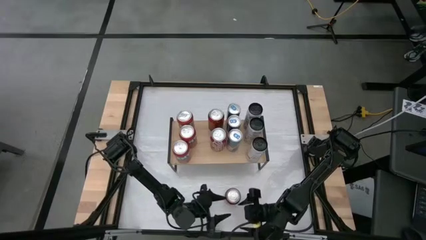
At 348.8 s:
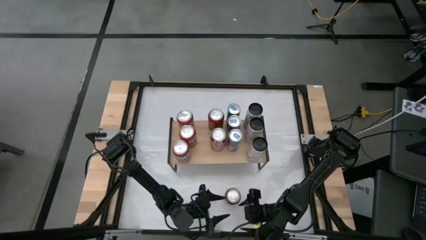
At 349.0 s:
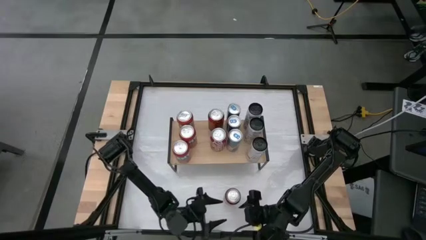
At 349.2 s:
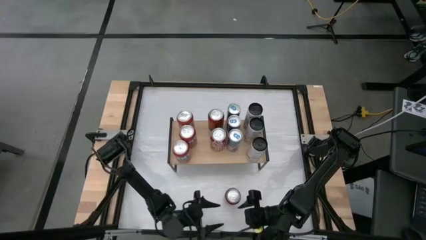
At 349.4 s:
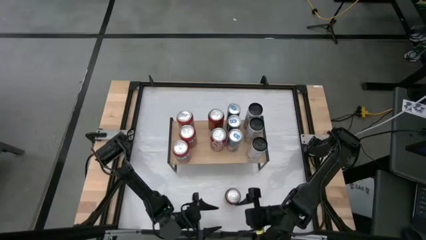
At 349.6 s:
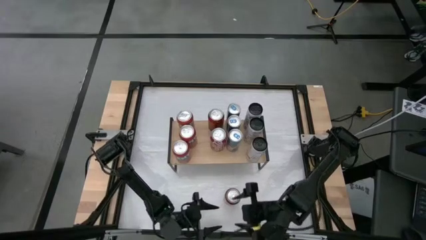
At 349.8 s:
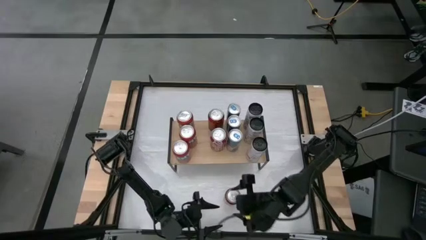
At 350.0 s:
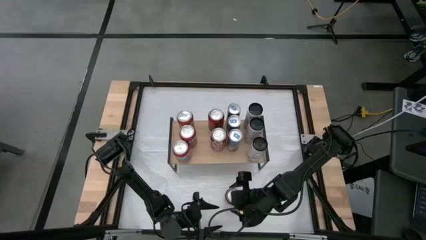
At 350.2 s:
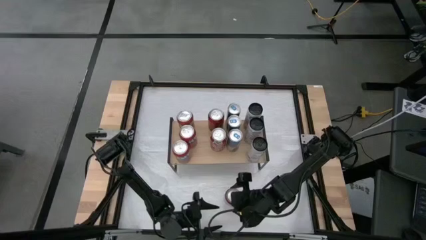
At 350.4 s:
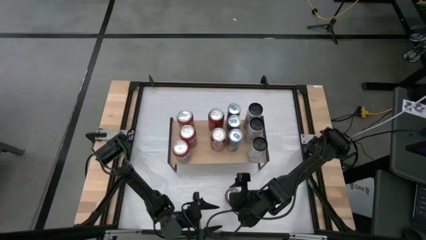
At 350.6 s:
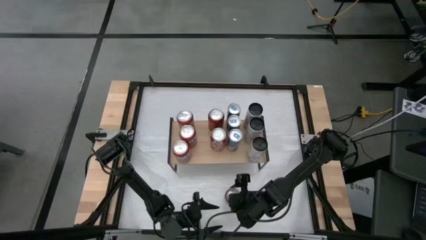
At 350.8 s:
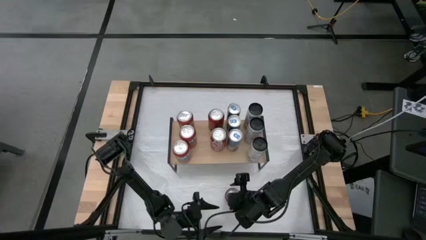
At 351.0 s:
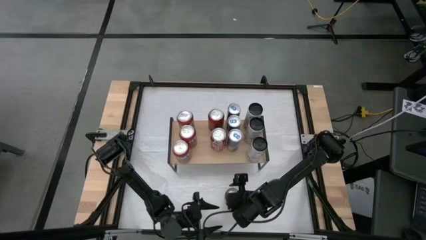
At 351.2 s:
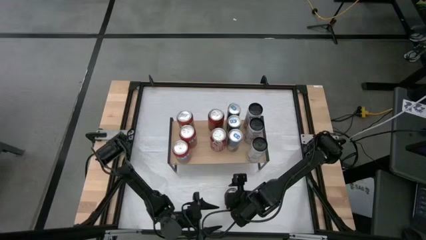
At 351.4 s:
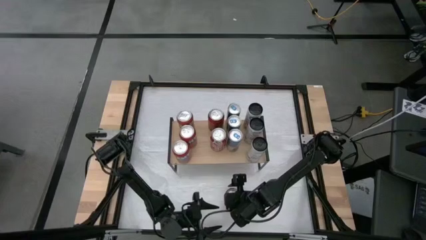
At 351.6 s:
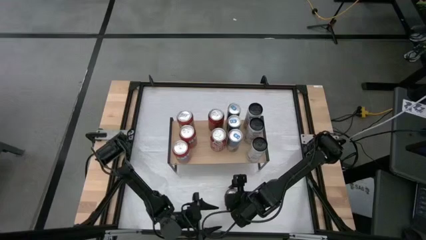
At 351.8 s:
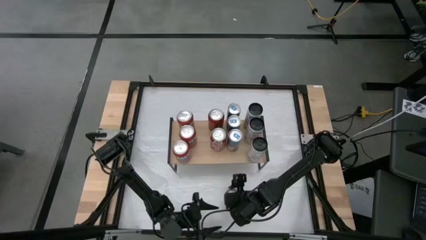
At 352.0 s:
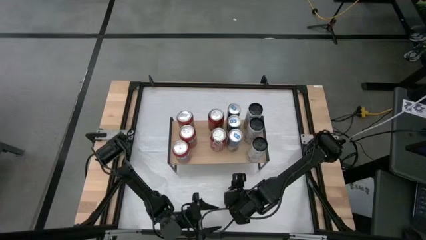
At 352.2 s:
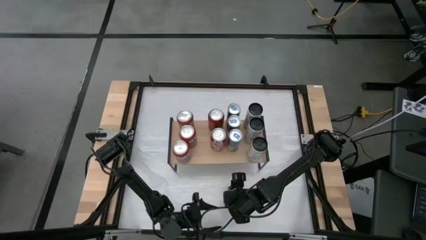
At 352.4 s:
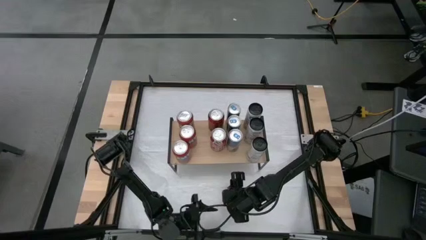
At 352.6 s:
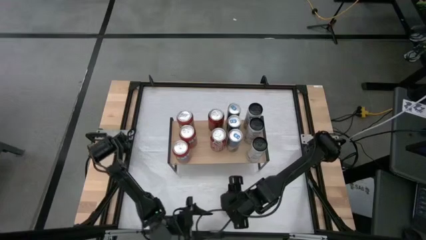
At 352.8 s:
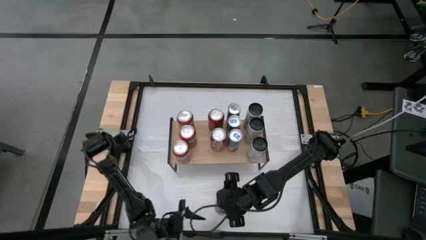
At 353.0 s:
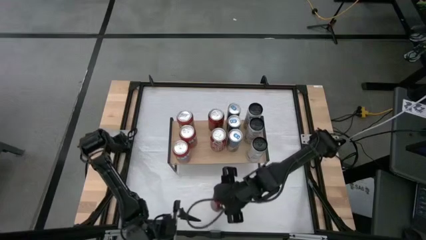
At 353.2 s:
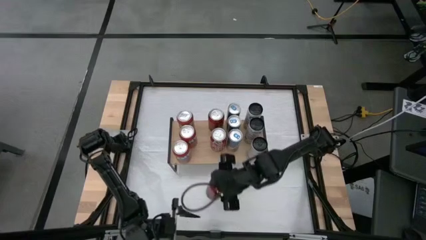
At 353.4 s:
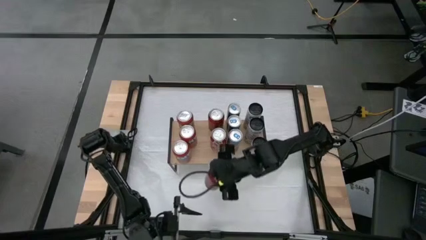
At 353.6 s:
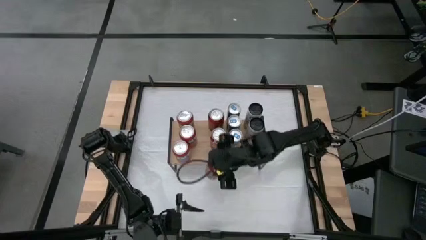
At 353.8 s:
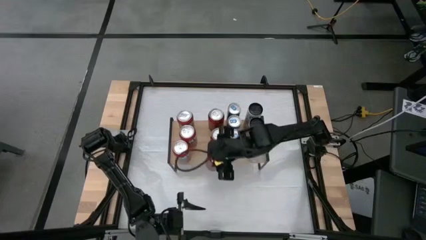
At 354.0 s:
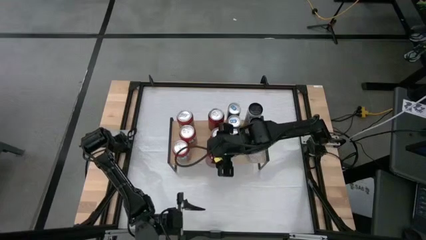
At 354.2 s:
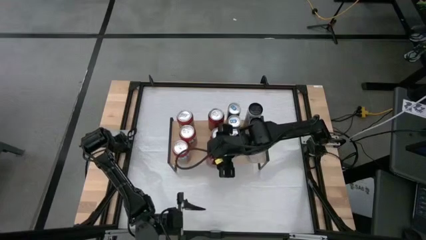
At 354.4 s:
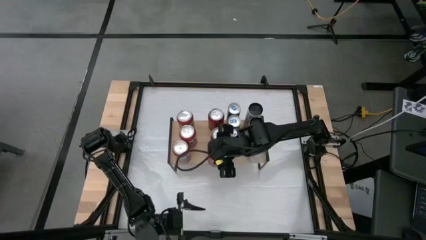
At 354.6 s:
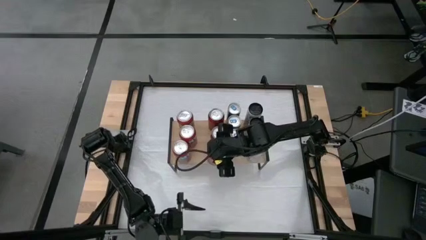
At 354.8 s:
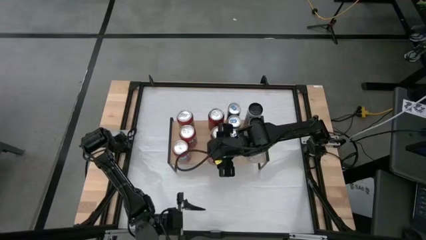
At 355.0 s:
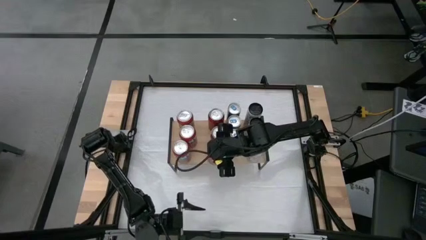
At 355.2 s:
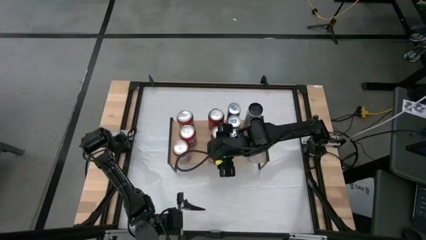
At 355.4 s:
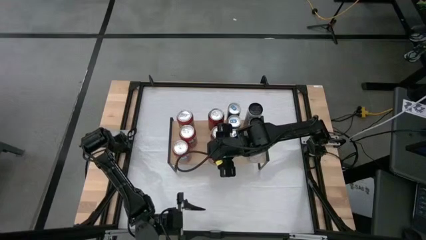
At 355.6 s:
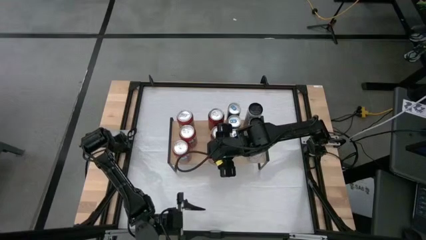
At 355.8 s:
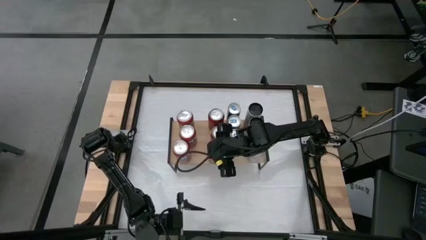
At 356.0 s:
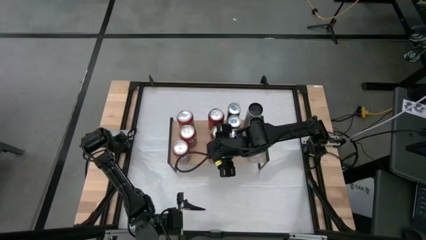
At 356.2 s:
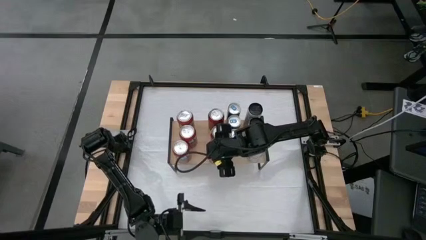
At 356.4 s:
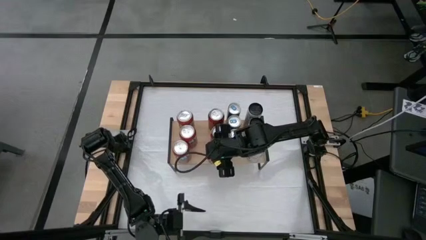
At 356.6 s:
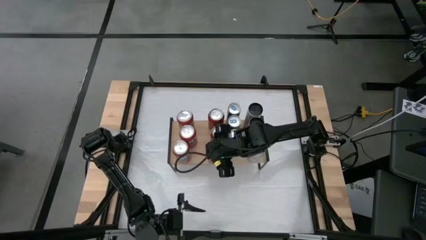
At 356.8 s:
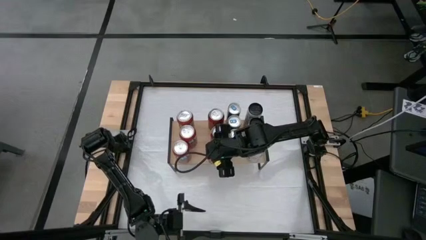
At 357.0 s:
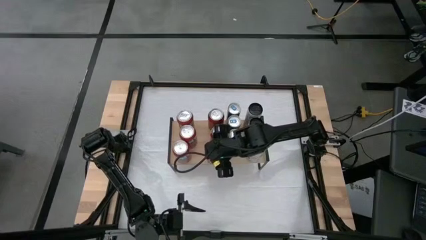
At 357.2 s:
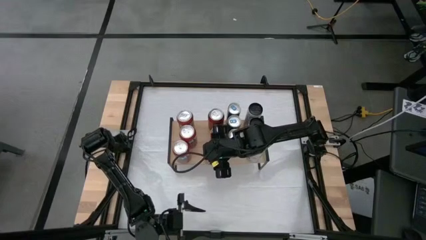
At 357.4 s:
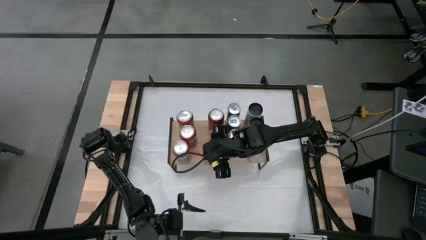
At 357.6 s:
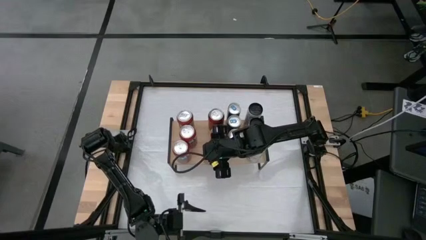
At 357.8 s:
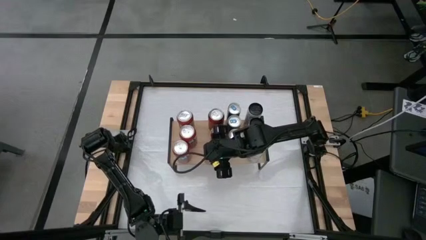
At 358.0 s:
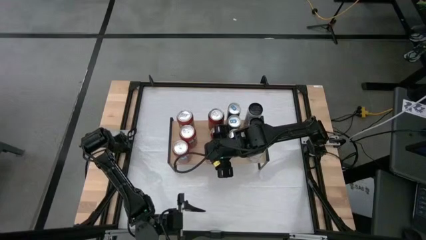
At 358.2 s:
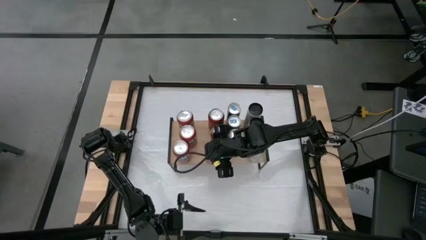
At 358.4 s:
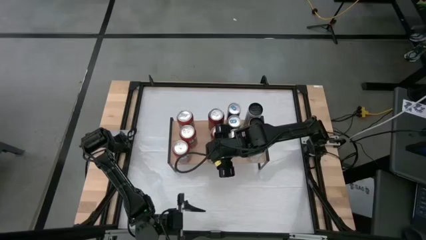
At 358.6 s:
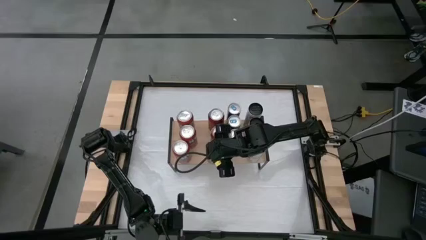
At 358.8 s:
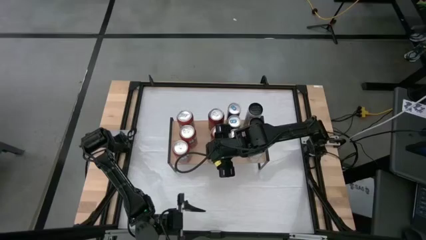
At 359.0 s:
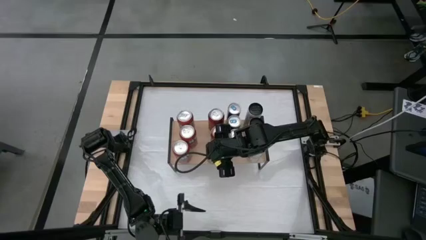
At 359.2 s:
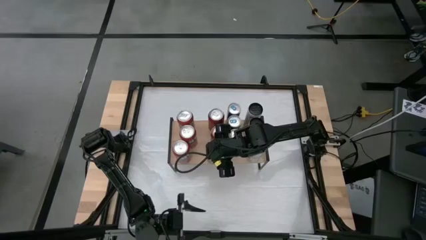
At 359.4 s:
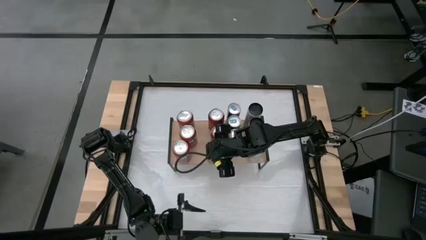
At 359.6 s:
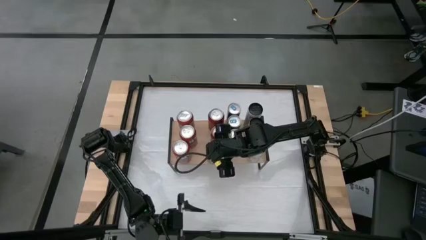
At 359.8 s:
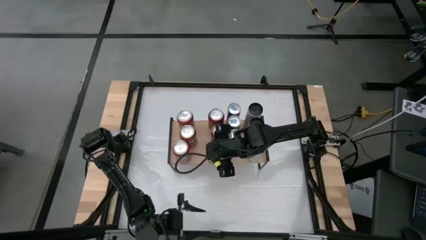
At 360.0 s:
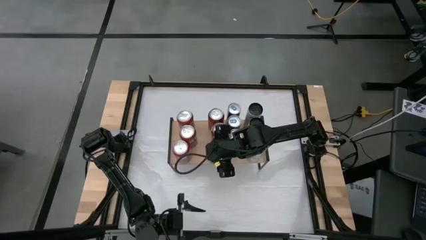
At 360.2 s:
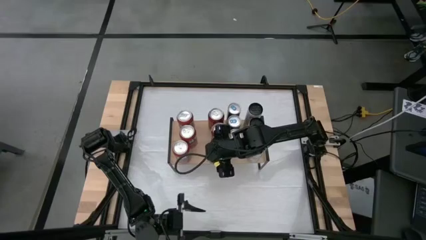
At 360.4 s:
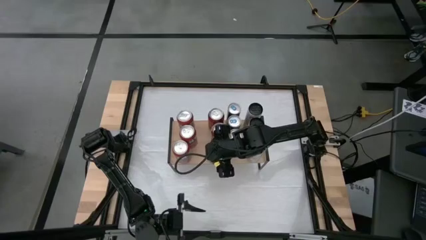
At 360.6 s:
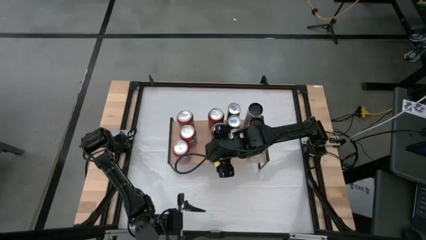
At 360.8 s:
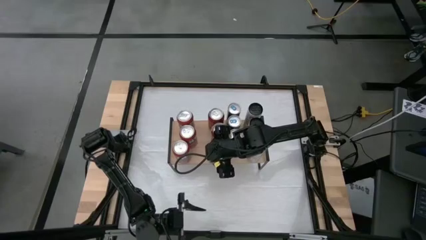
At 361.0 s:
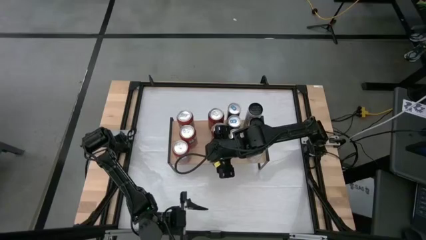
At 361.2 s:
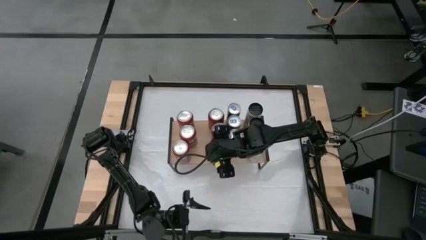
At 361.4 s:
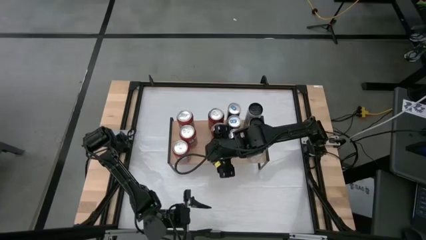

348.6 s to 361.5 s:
Task: Place canned beverage on shelf
Put the red-black soda can on the shelf aligned with the other red-black soda cans

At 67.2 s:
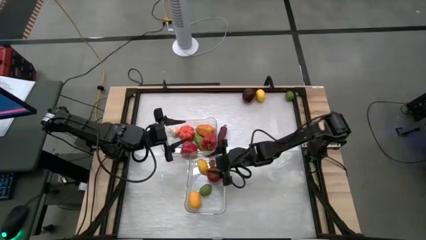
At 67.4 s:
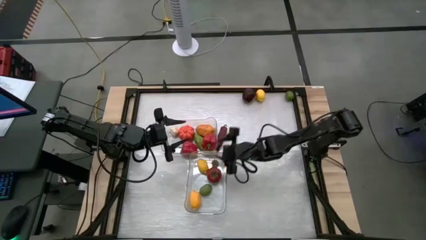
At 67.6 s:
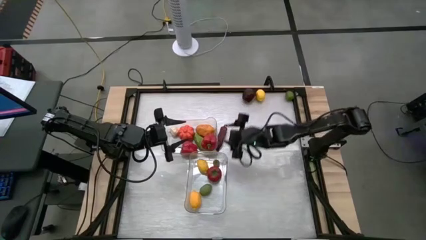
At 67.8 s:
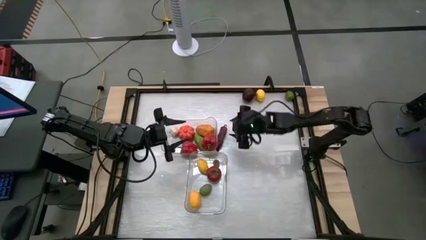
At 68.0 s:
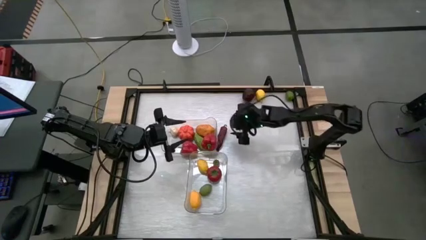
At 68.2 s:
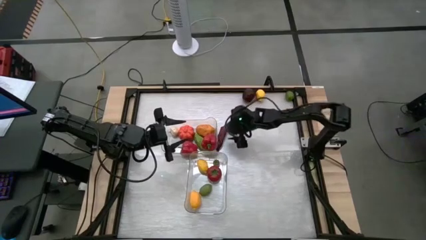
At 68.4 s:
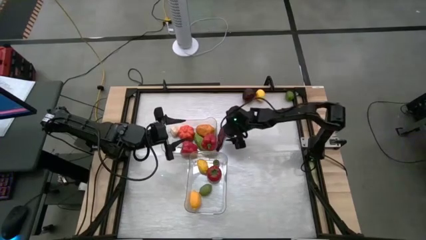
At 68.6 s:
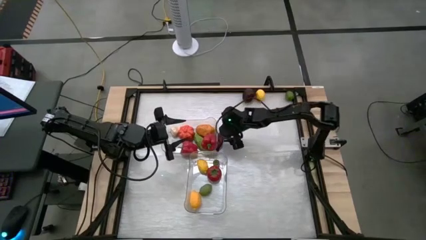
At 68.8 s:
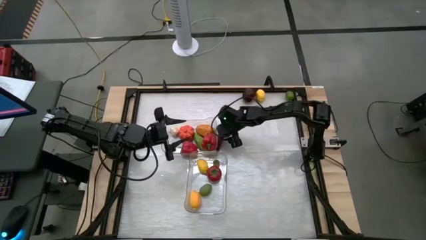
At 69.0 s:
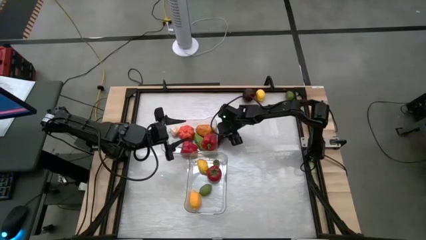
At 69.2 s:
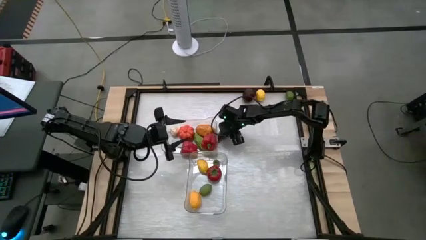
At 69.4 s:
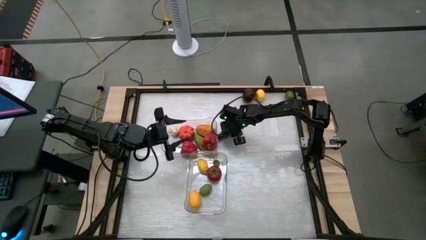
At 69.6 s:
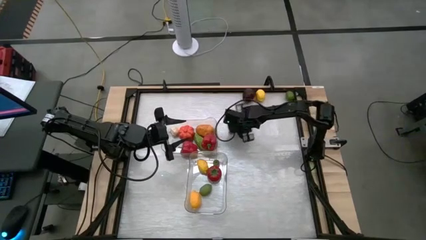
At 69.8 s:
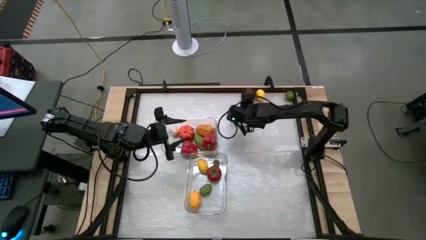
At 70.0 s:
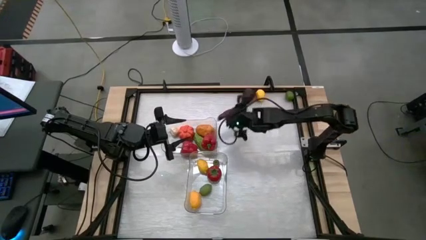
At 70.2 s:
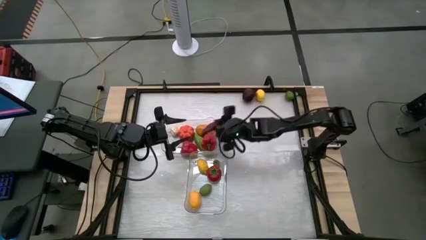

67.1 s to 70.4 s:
Task: Sort produce into baskets
Put the red chili pepper into the top transparent bin
